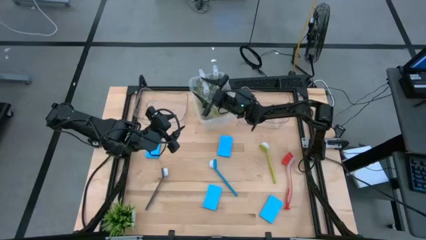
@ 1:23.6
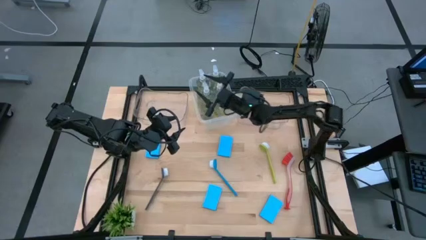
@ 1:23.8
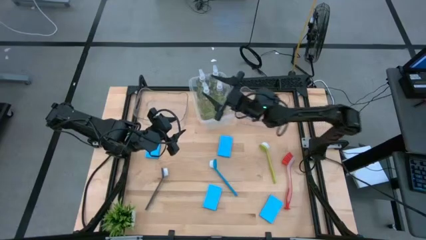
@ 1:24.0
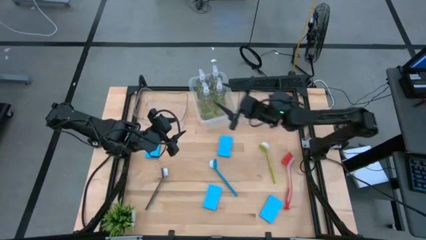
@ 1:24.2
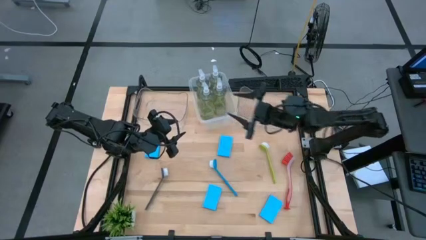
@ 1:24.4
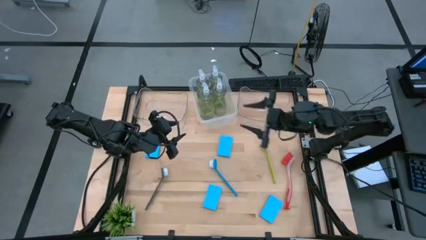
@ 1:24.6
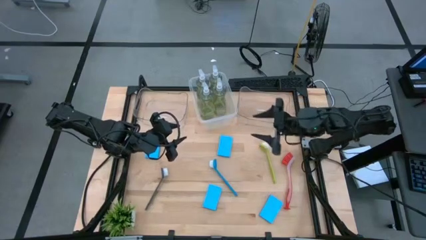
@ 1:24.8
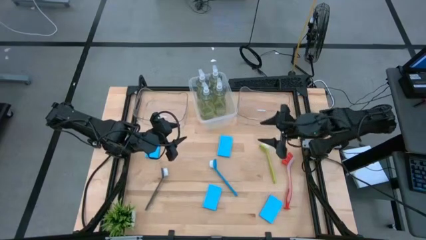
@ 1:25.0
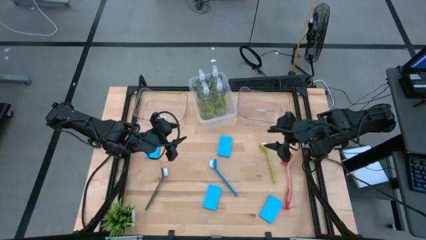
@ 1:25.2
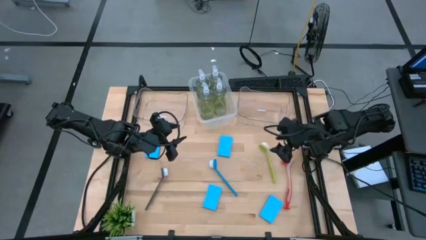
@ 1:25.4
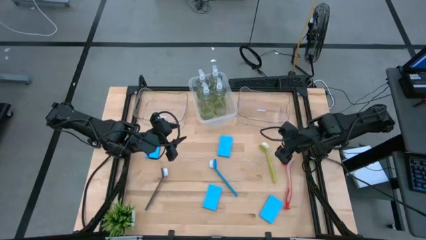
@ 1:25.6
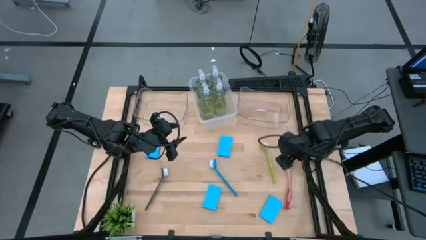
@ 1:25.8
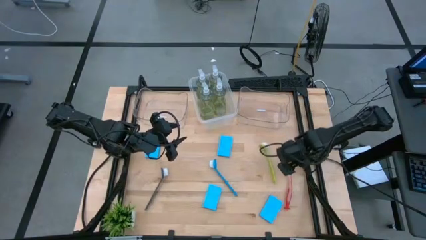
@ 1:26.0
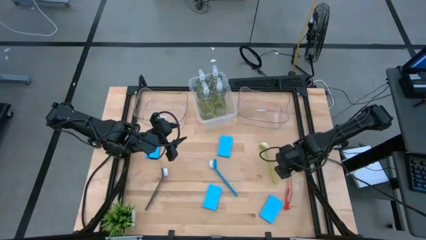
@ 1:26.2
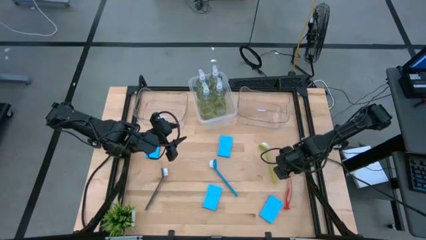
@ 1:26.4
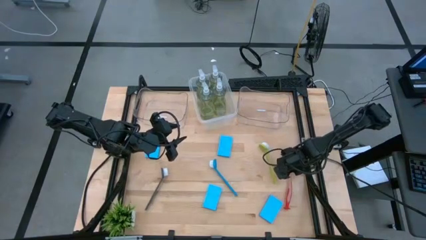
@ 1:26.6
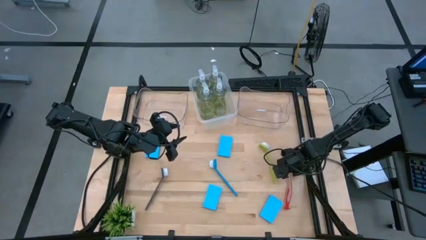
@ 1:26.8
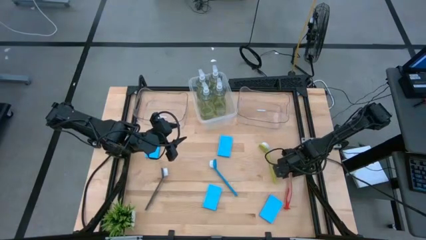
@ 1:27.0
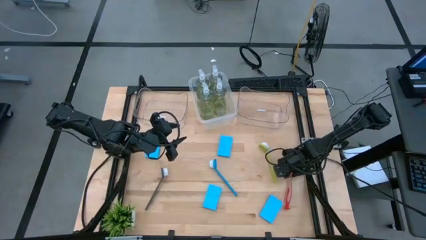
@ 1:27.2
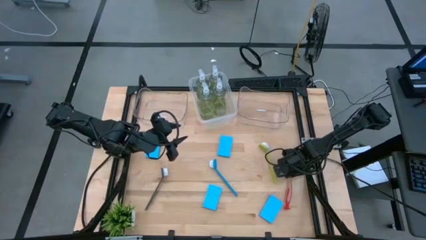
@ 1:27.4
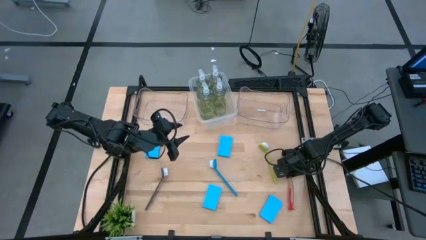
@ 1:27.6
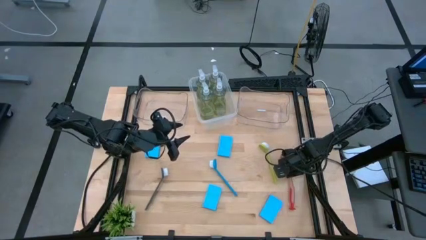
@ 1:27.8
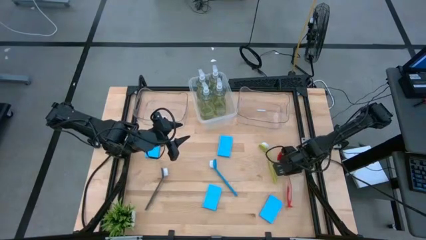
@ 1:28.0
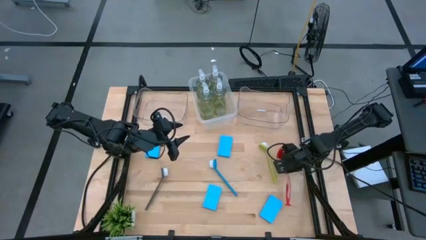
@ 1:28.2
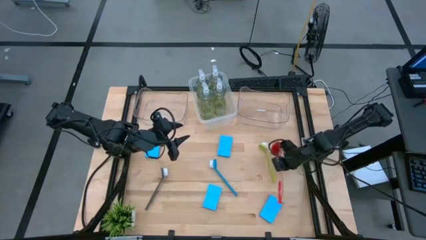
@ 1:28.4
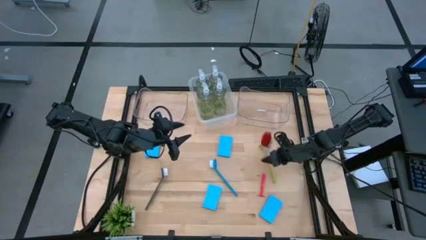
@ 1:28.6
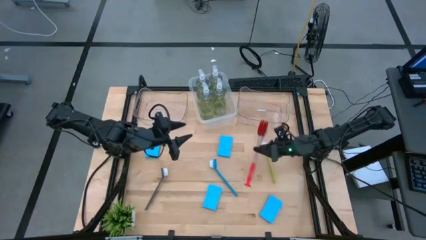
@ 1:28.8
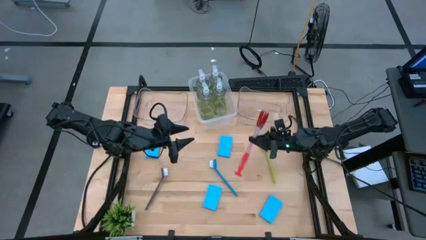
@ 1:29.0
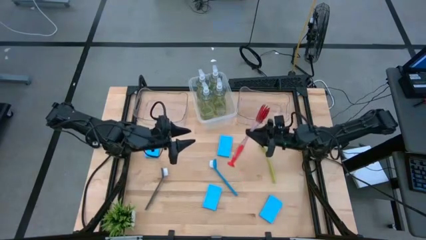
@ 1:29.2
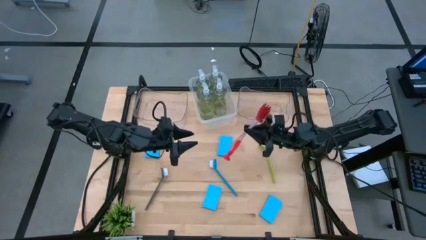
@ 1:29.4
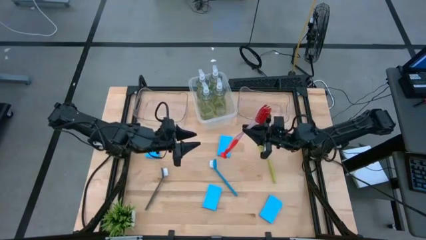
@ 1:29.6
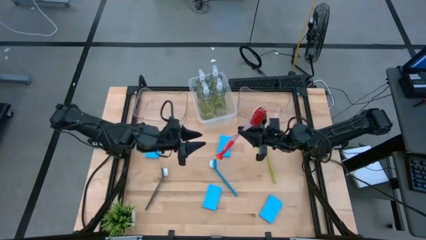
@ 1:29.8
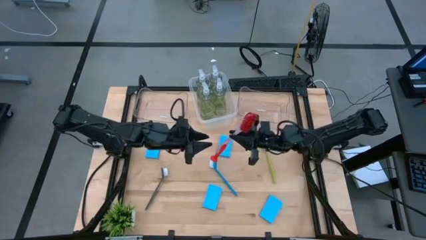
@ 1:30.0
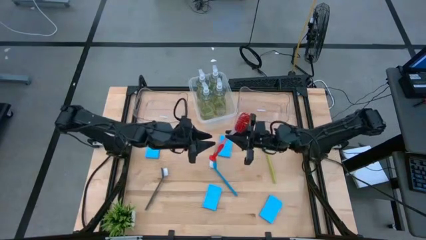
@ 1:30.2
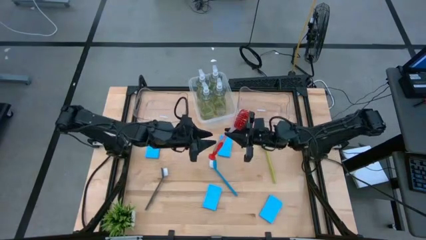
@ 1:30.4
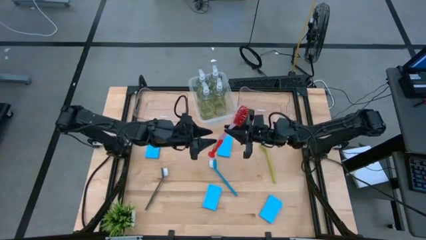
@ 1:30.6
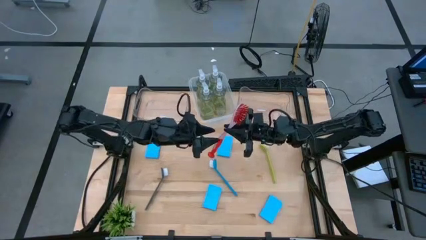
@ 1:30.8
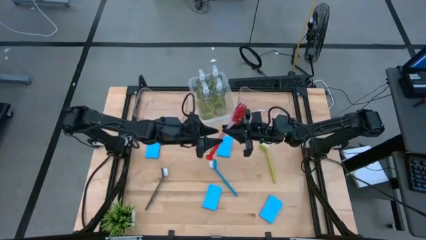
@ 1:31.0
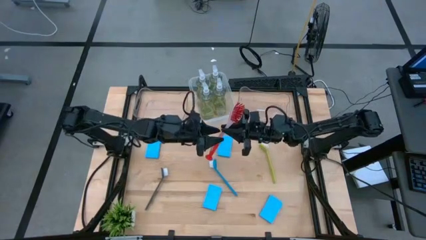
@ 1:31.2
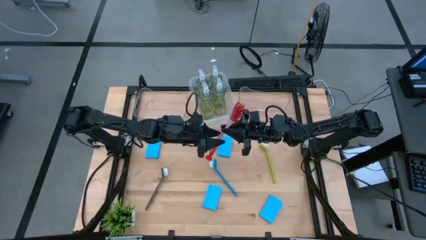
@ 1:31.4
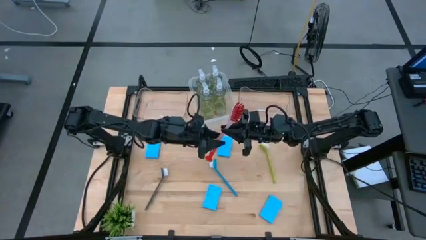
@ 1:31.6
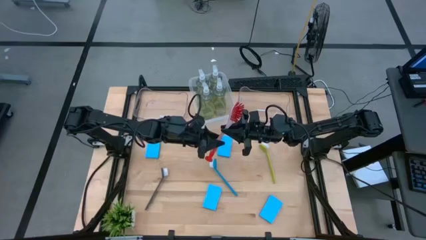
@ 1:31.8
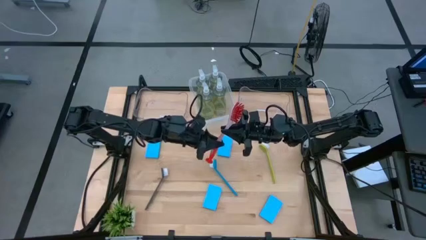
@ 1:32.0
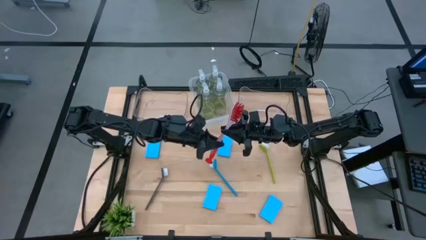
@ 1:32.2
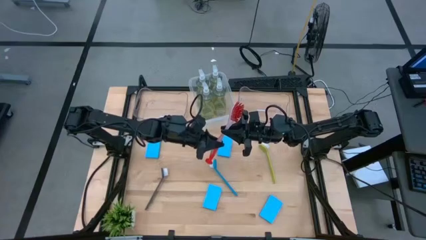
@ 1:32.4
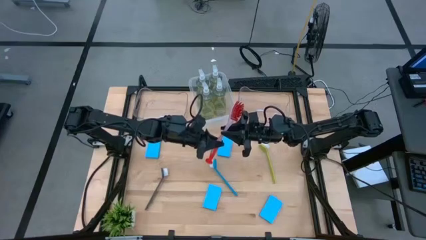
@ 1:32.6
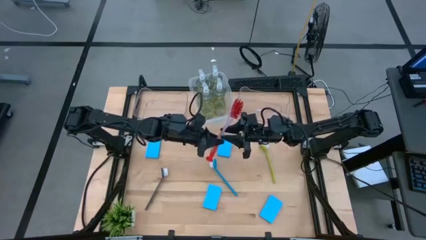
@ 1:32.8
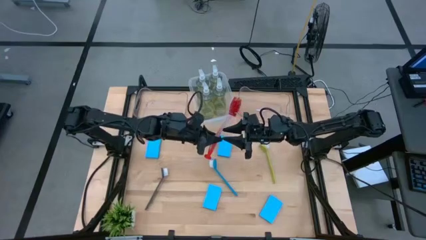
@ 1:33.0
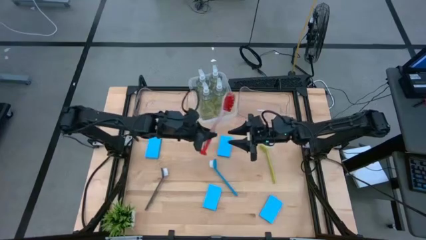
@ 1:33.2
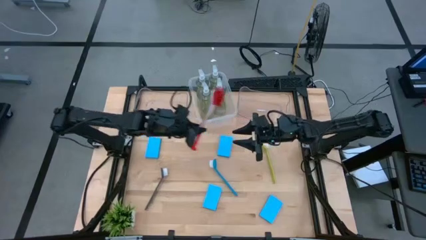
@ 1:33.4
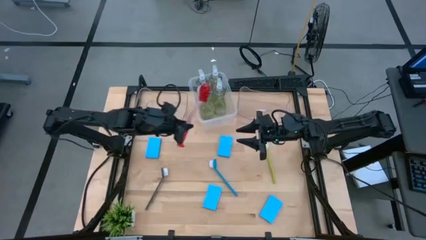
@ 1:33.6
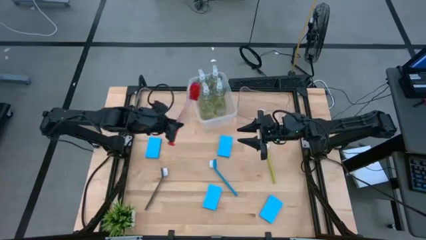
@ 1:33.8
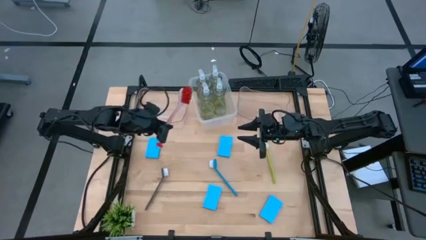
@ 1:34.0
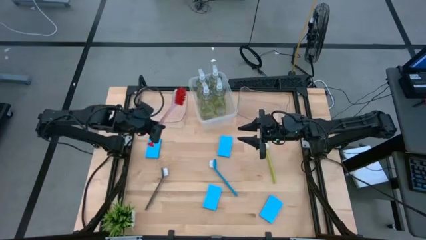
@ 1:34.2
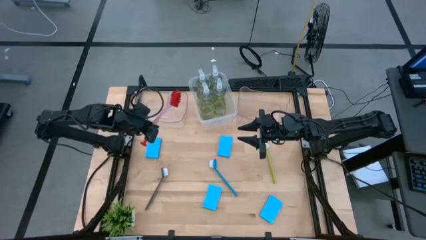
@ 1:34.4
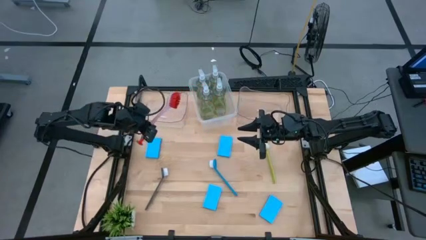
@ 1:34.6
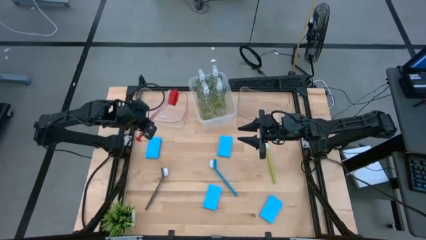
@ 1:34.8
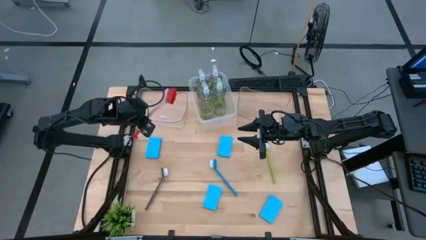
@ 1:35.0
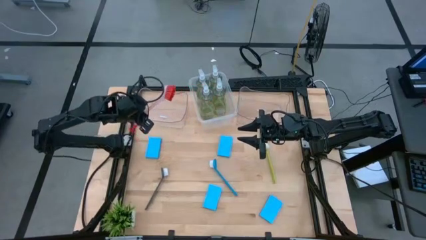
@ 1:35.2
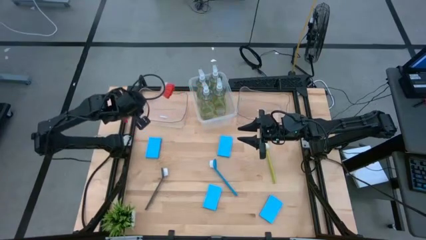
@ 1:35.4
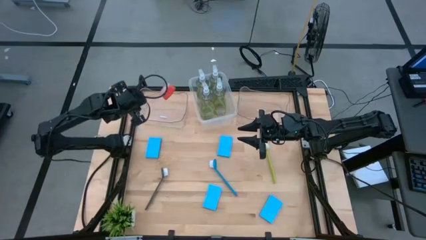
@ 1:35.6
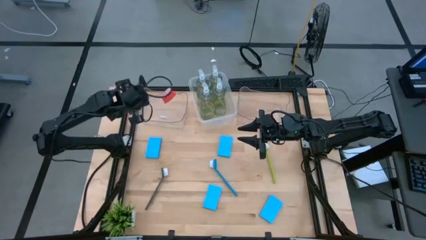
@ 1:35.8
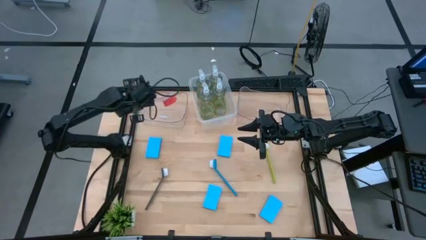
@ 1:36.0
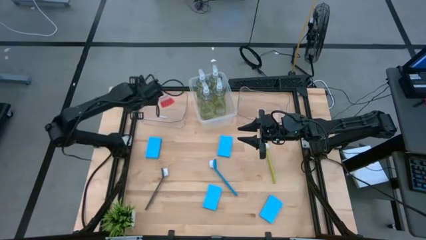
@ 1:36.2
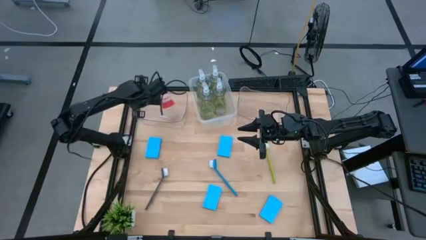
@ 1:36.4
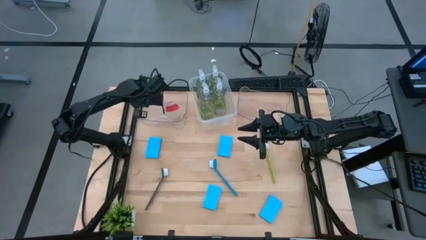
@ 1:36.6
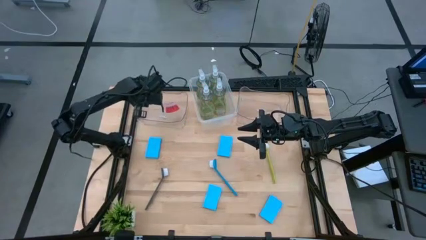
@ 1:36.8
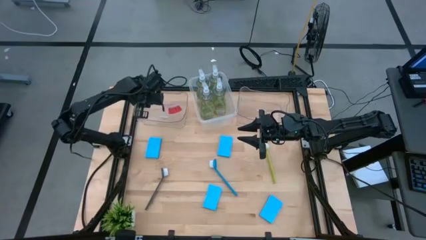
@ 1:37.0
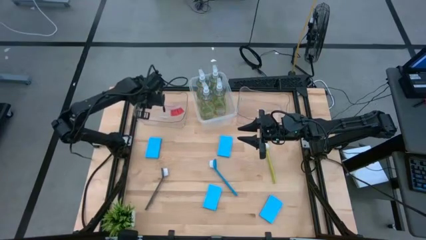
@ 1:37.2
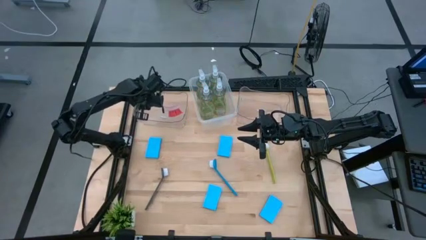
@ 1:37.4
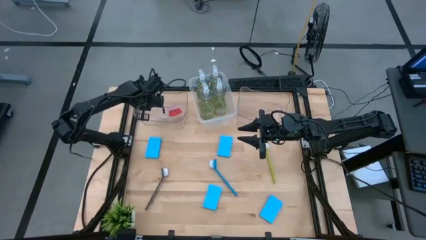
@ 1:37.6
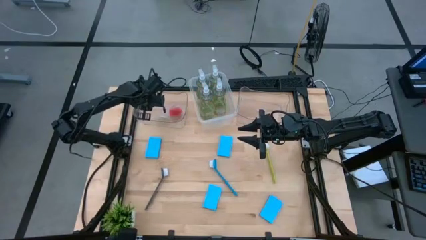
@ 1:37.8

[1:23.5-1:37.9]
Task: Pick & Place Kitchen Sink Supplies
Put the orange dish brush into the left transparent bin
